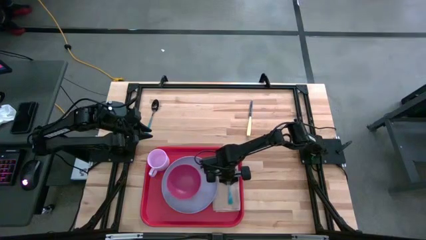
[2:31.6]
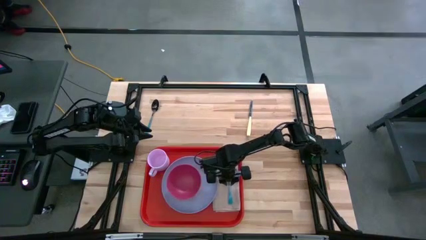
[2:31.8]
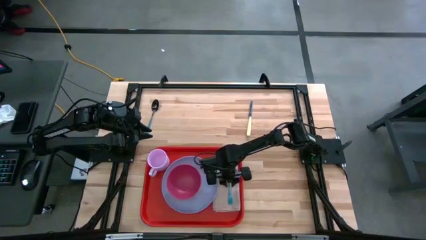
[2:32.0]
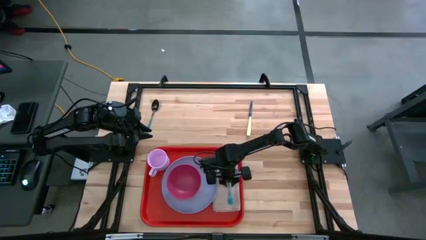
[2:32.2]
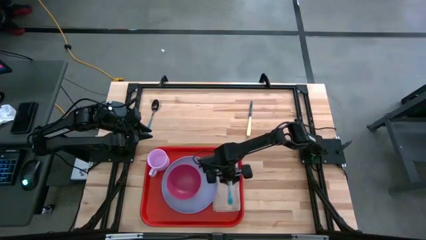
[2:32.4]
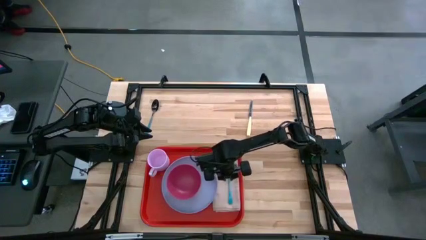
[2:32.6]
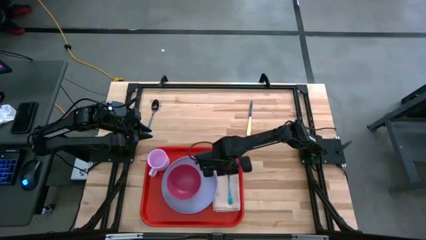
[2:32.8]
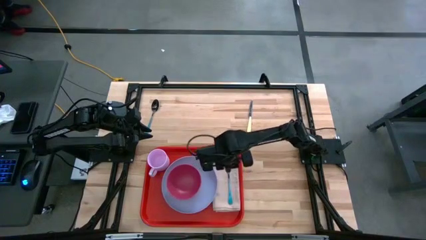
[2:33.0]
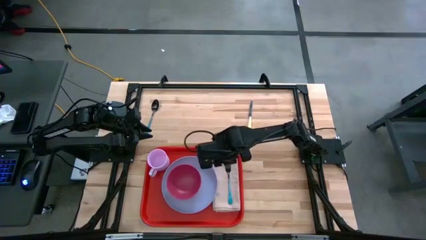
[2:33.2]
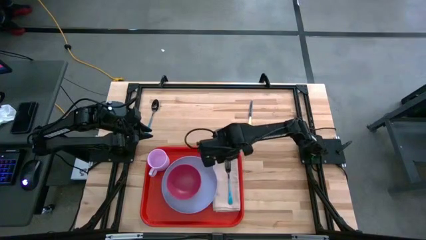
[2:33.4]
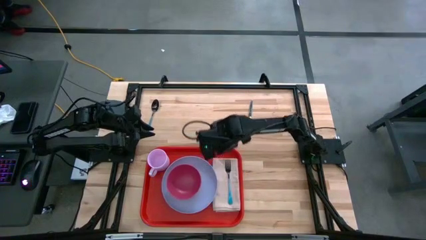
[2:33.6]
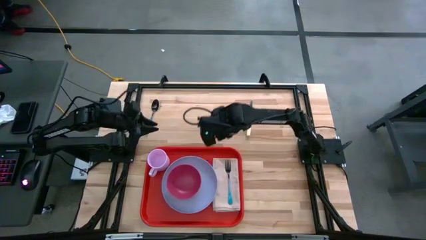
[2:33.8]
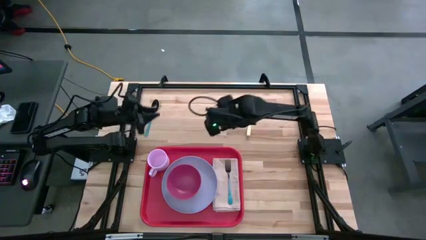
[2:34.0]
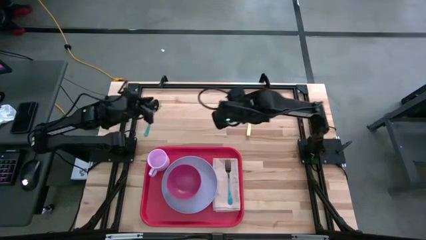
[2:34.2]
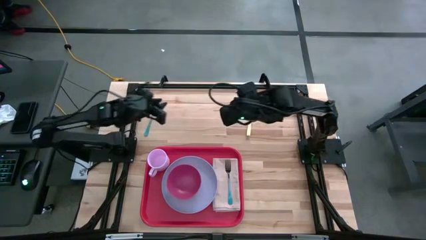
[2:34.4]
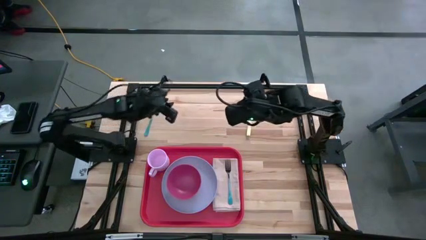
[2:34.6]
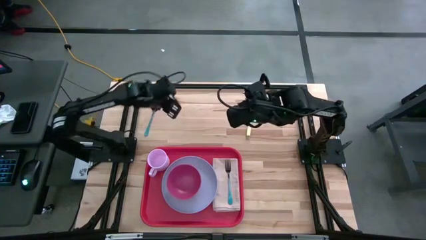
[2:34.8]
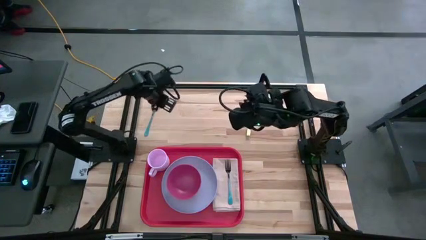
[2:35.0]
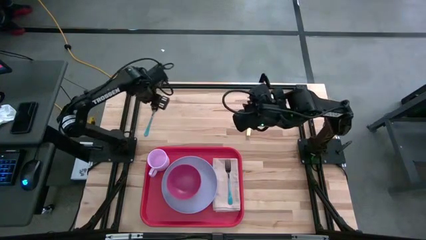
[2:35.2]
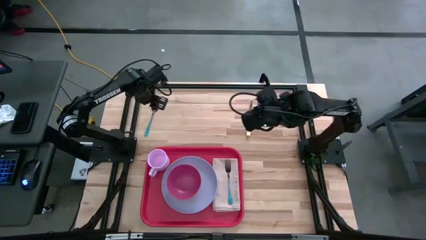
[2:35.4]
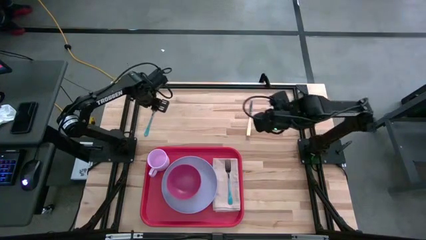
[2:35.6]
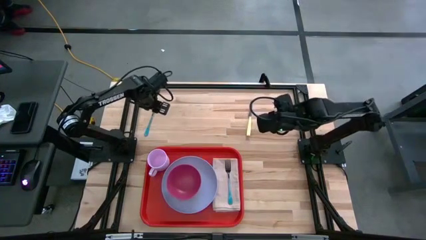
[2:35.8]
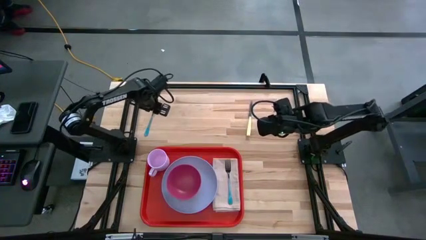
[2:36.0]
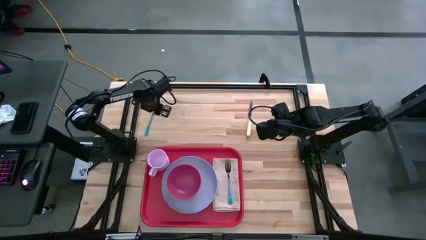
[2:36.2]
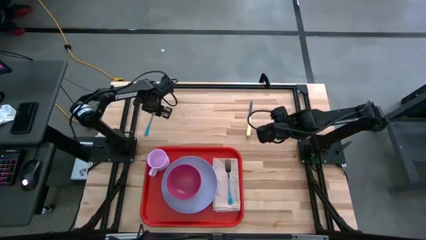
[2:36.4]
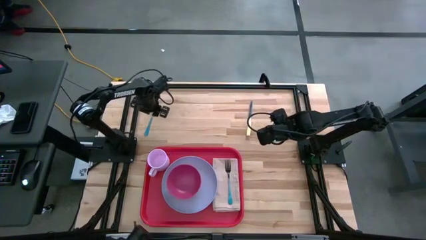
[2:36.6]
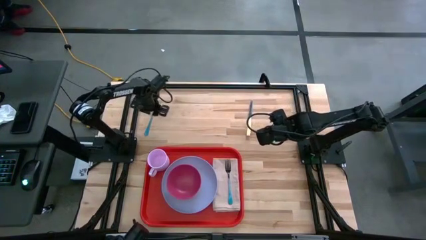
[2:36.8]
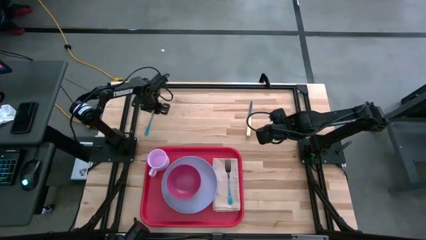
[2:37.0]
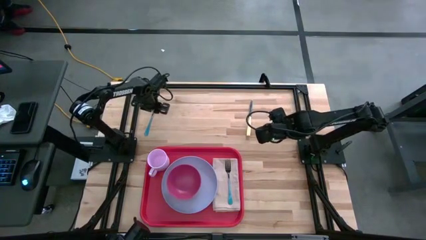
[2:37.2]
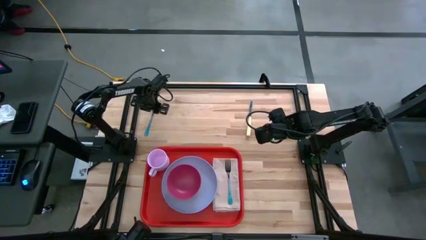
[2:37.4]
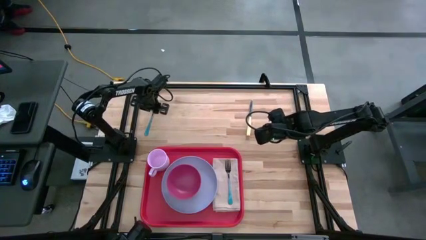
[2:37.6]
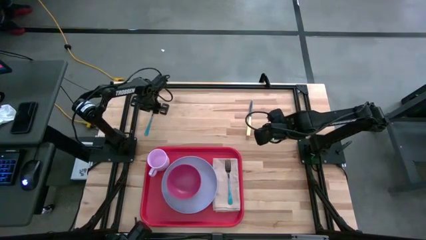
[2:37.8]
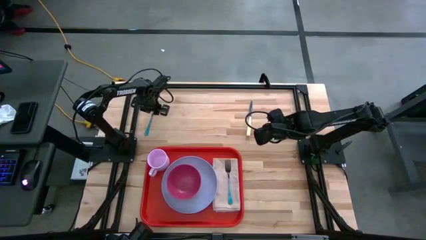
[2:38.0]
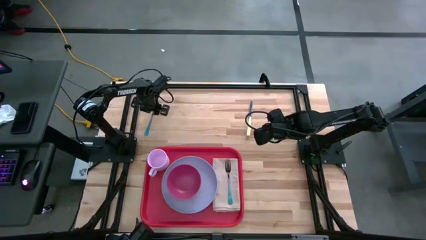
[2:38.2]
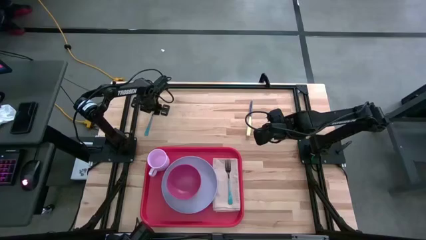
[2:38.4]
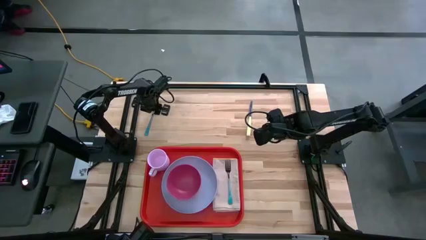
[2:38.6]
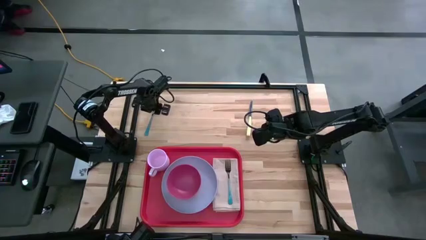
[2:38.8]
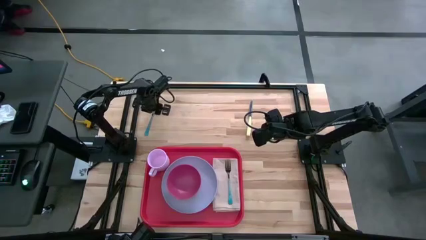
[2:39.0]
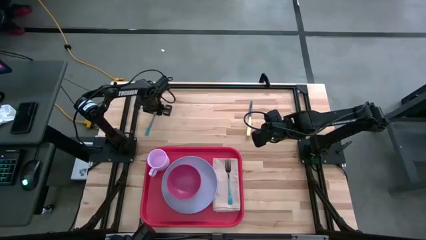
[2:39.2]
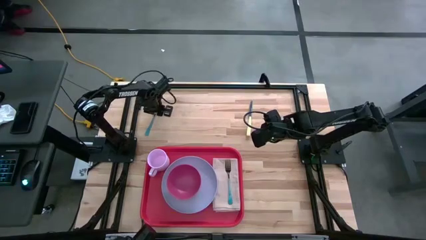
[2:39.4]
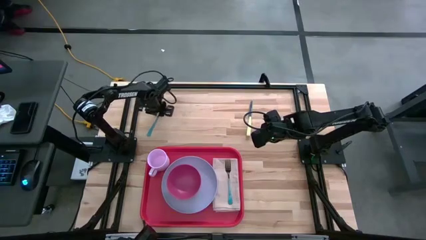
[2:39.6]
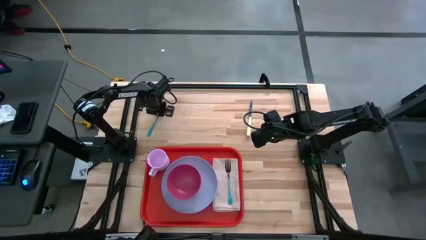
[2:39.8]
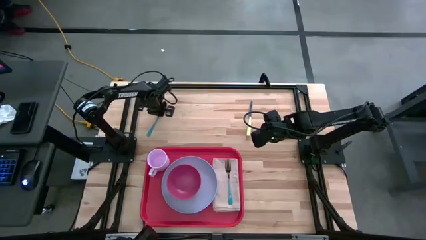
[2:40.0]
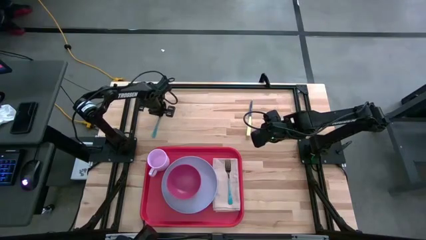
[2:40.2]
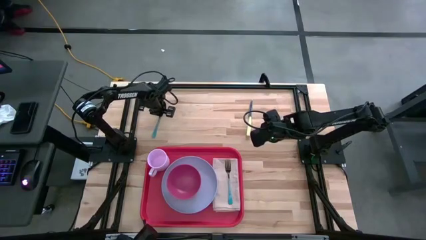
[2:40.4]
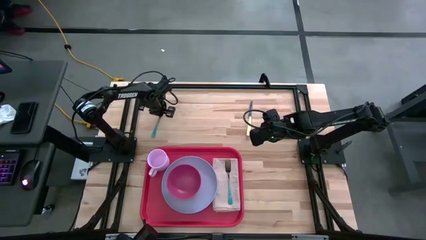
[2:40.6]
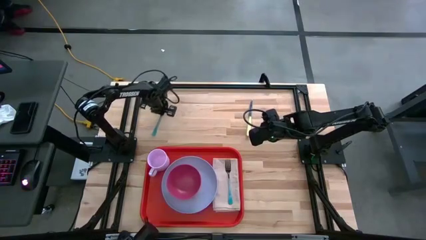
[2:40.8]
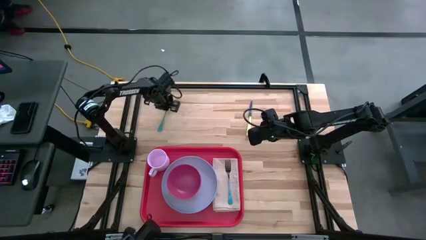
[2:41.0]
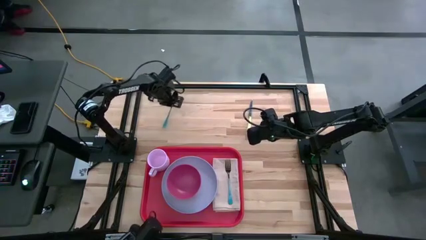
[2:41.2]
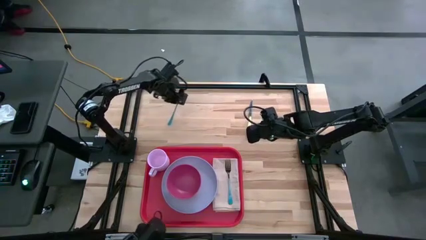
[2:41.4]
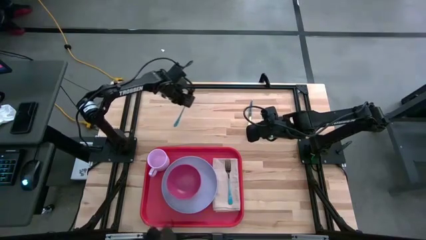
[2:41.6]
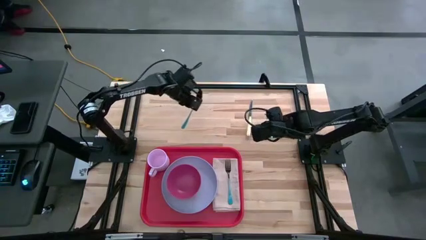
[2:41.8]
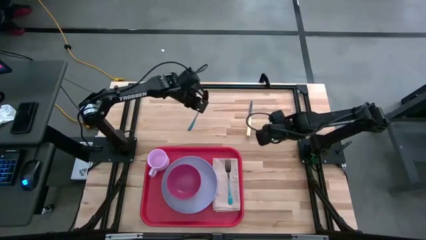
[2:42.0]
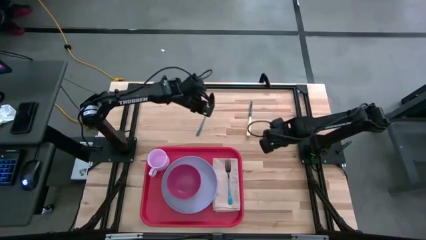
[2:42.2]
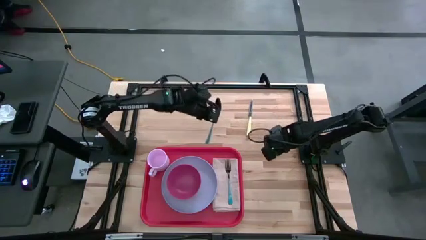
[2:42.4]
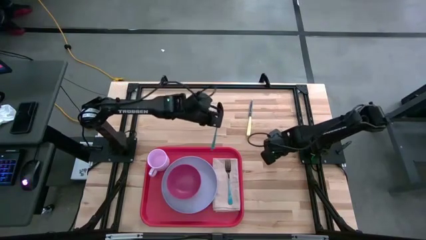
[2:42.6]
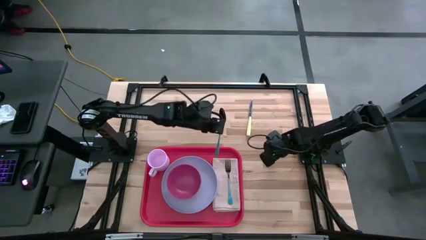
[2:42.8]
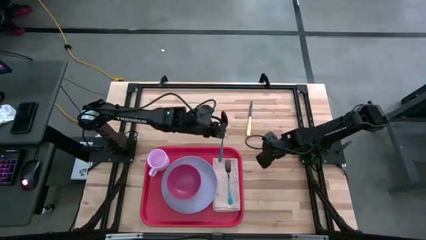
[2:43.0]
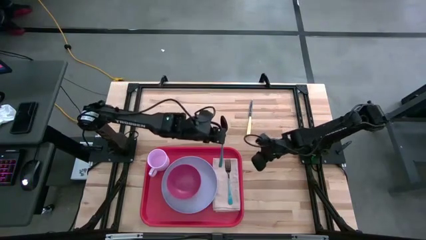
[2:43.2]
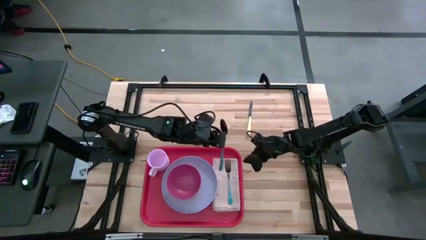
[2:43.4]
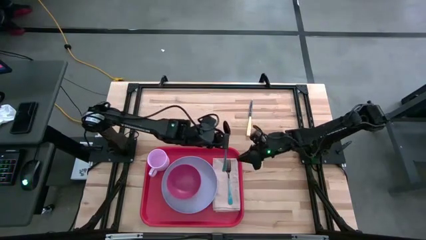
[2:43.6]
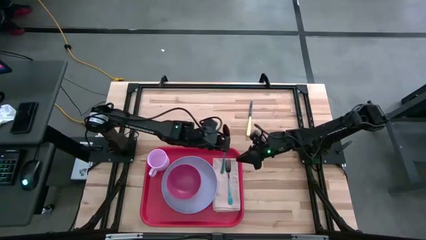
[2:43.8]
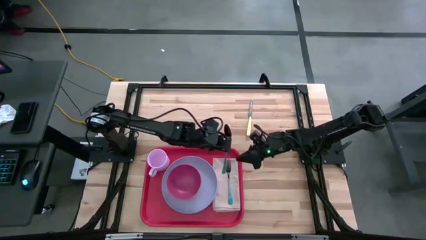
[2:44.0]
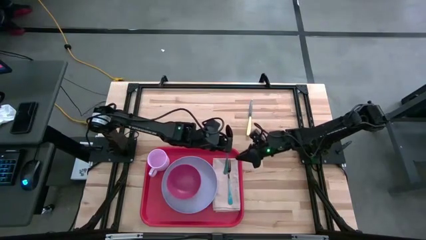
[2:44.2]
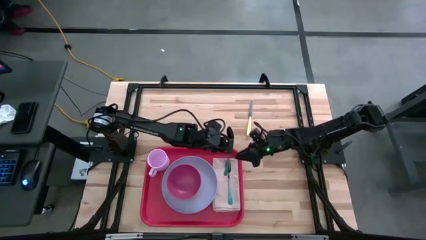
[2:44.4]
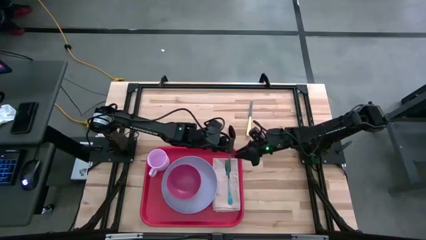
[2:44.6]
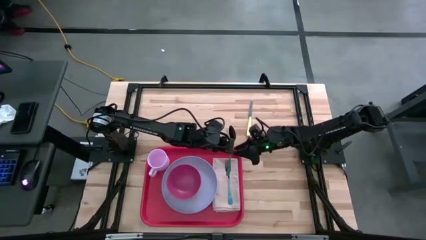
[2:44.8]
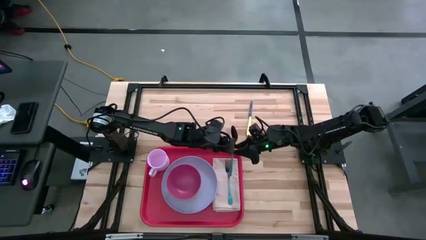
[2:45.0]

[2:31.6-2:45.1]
Task: Set up tray
Put the blue spoon beside the blue plate on the peach napkin
